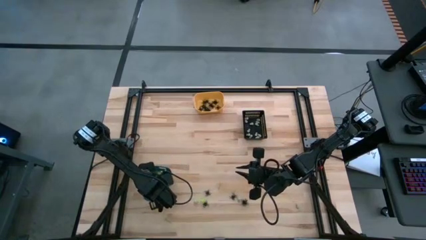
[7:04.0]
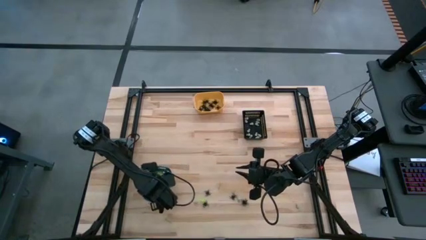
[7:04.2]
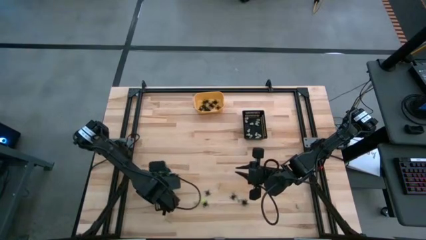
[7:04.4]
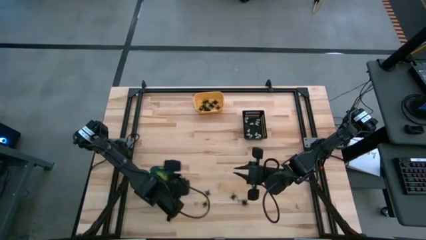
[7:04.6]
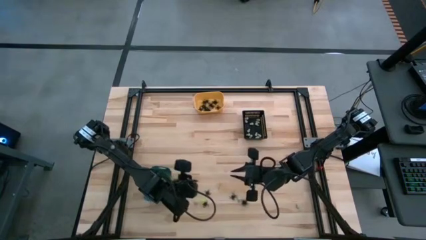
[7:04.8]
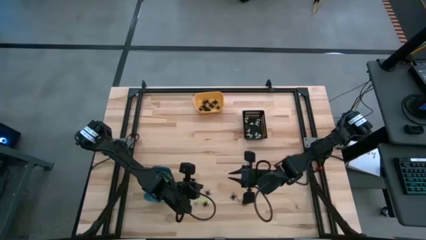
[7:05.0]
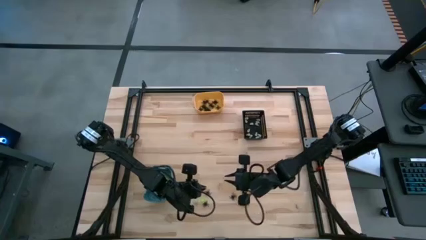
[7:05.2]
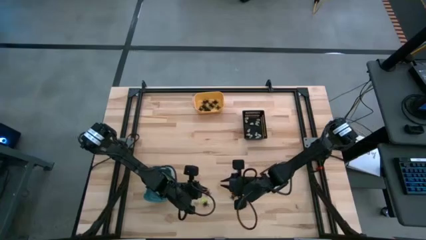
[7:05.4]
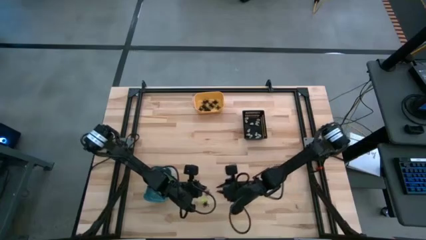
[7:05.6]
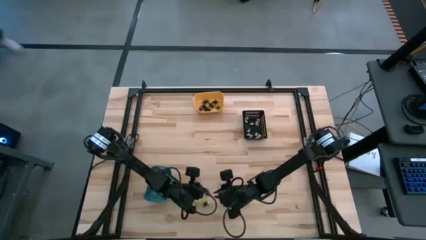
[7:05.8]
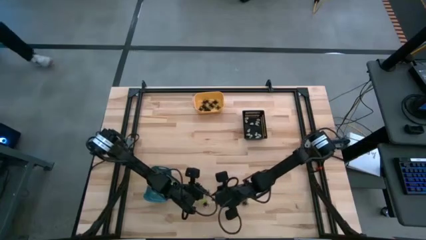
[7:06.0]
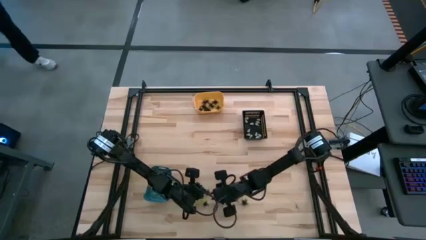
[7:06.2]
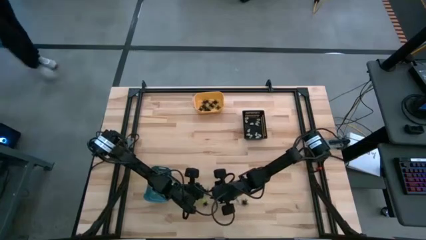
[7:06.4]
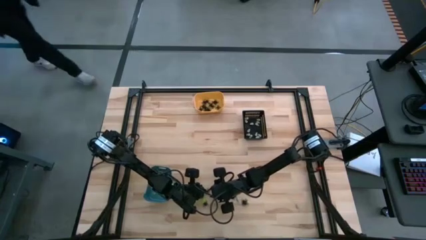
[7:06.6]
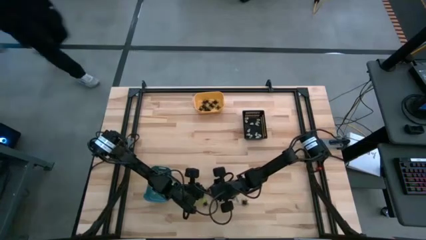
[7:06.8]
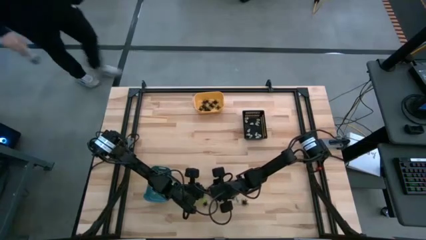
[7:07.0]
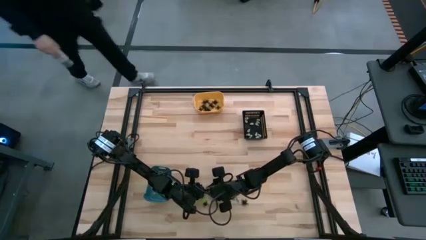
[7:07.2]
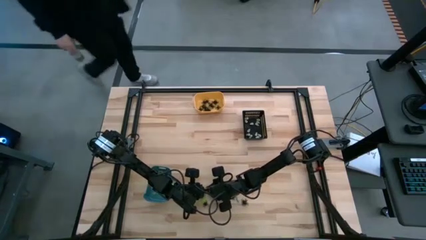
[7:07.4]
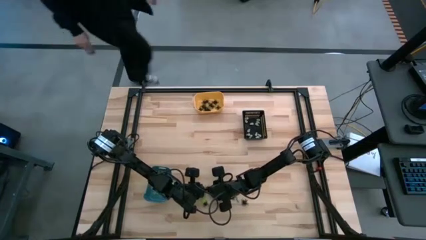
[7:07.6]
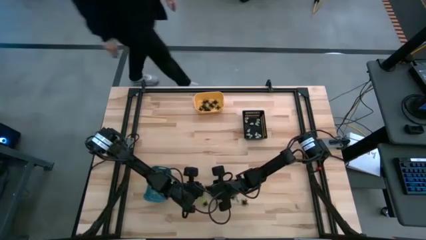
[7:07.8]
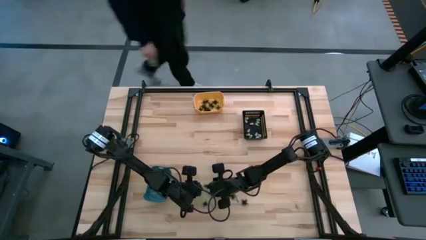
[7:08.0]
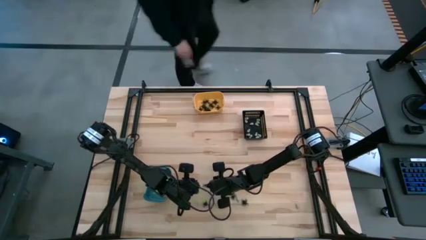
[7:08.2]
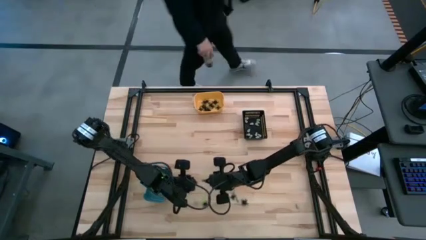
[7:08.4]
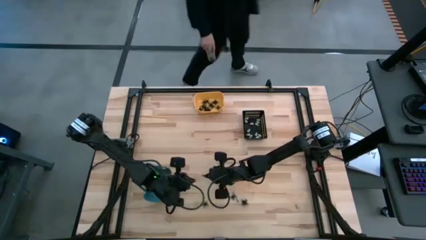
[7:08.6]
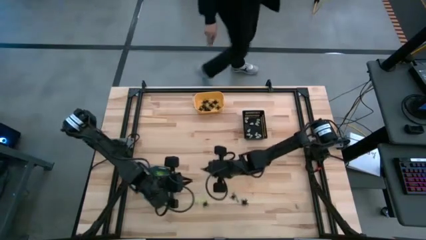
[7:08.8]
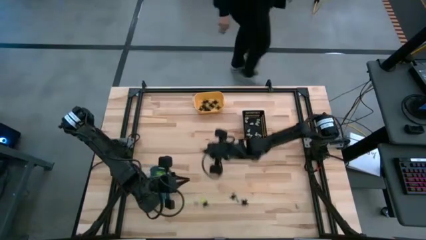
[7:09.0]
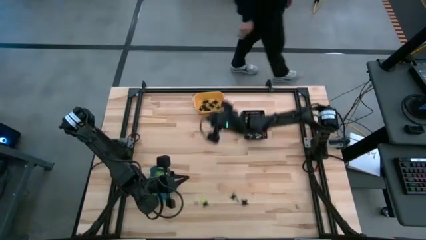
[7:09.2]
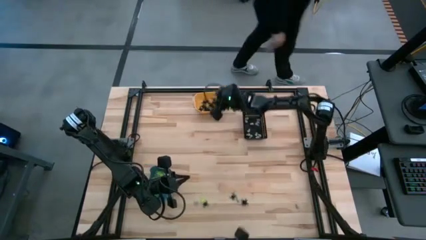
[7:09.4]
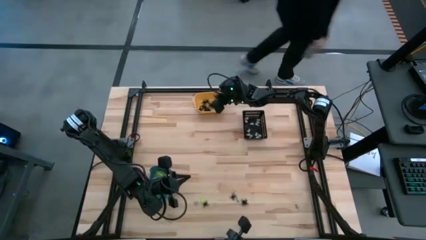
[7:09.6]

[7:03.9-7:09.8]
Task: Sort Halloween decoration
Put the black spider toy into the yellow bin

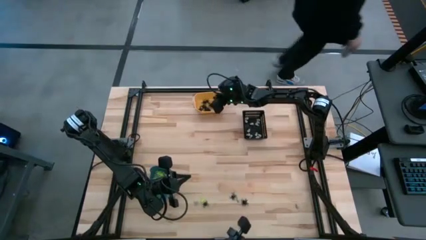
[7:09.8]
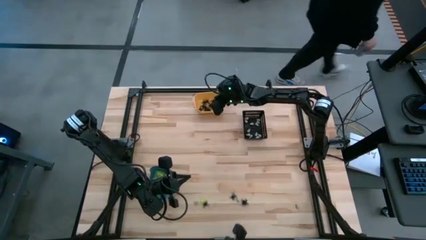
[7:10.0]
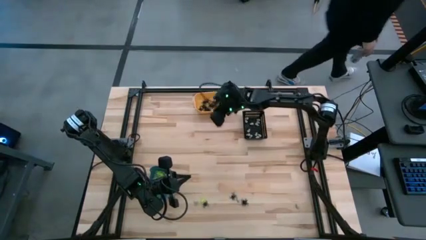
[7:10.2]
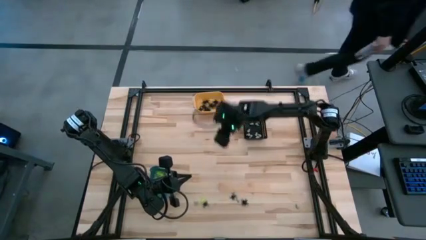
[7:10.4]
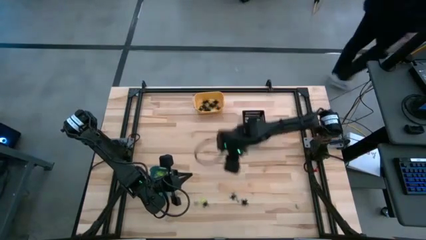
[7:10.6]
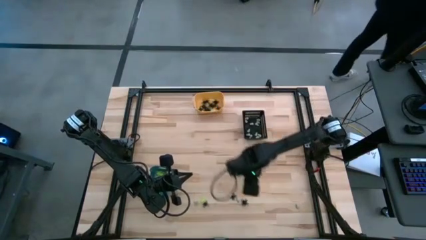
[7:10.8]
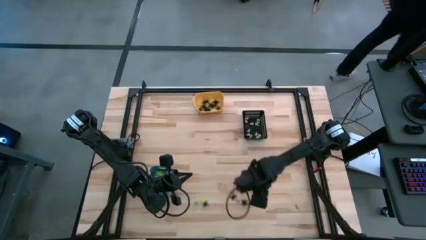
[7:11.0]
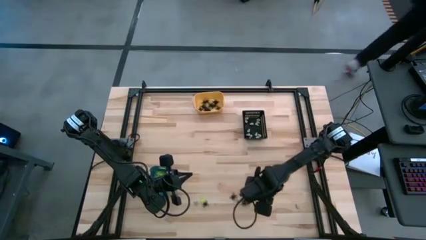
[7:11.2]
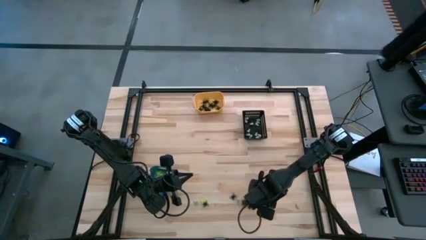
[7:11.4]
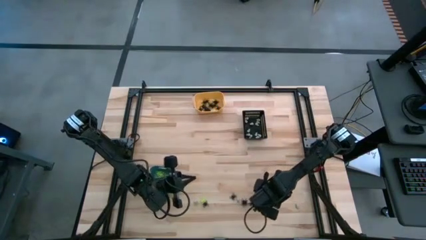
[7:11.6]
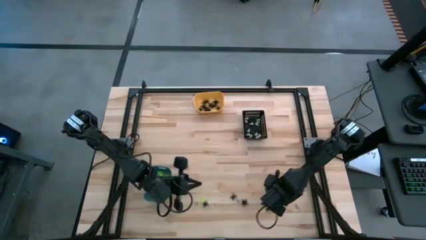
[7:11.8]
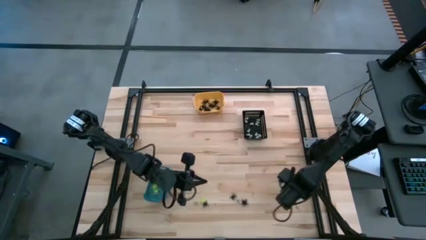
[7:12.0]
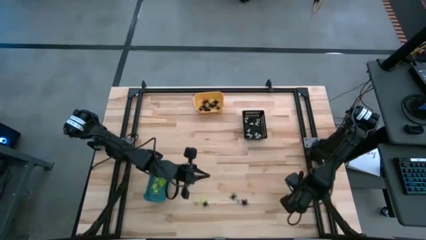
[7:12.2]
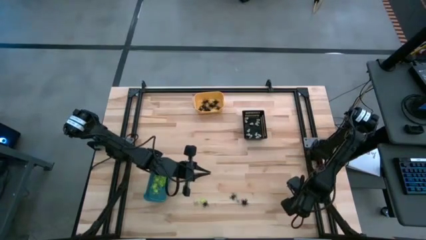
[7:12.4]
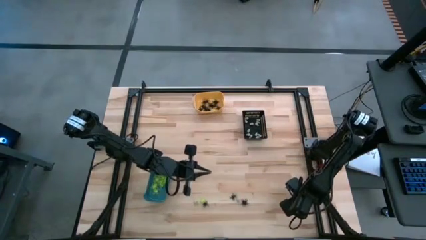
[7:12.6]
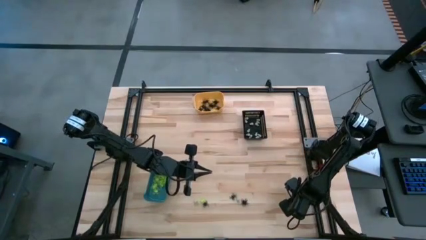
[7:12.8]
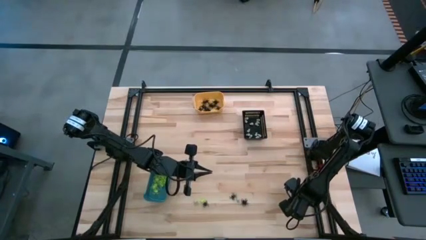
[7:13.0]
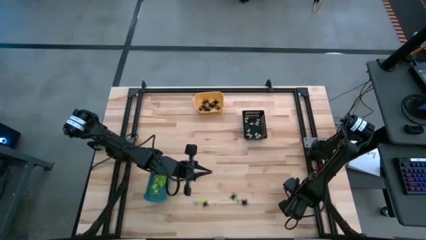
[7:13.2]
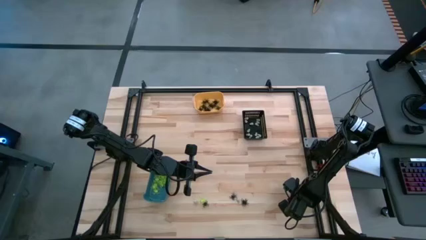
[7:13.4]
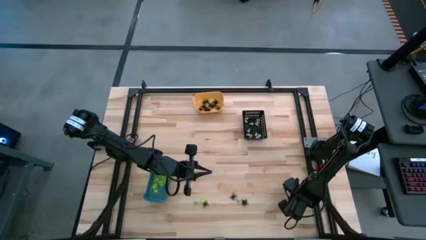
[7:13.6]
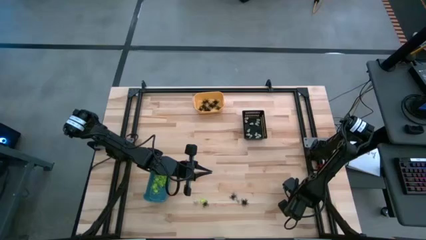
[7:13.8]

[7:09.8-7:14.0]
Put the white skull toy into the black bin

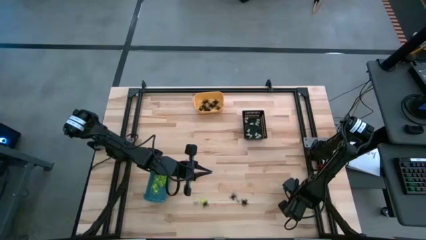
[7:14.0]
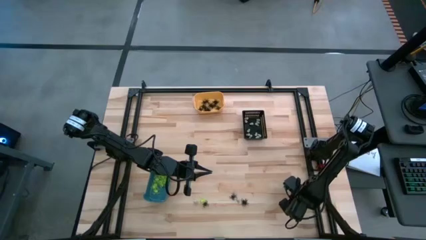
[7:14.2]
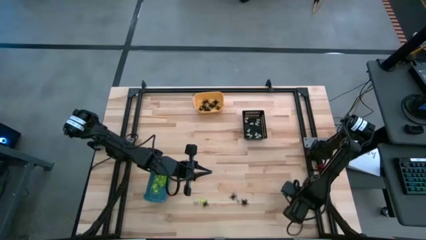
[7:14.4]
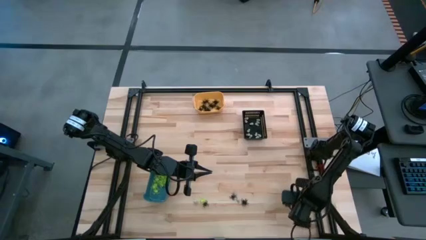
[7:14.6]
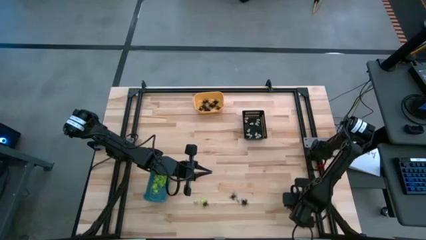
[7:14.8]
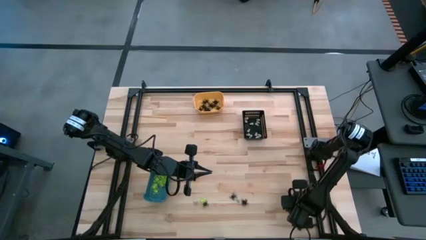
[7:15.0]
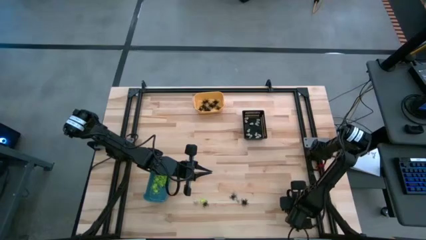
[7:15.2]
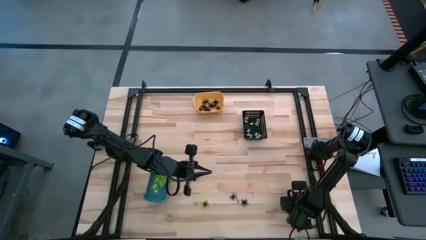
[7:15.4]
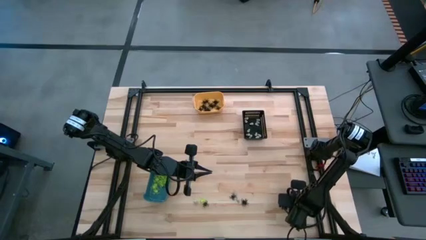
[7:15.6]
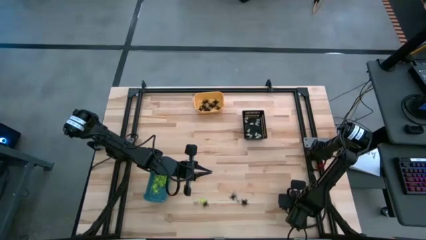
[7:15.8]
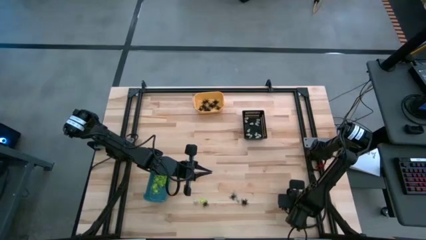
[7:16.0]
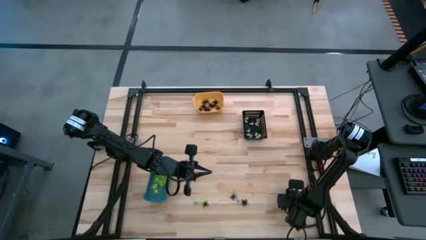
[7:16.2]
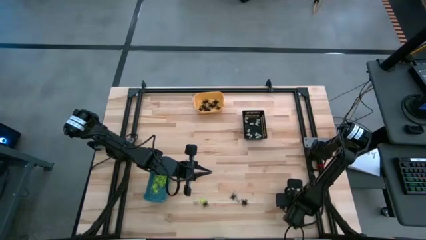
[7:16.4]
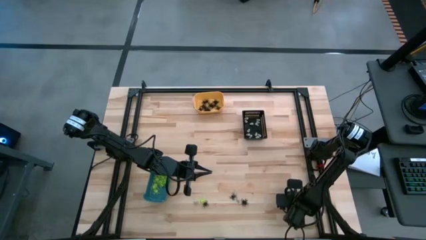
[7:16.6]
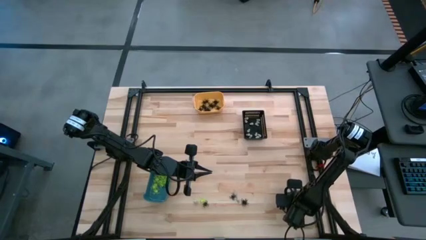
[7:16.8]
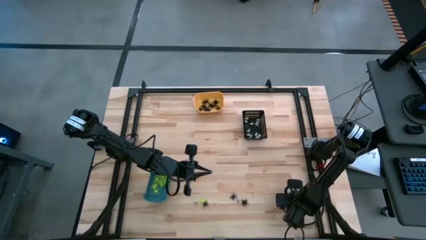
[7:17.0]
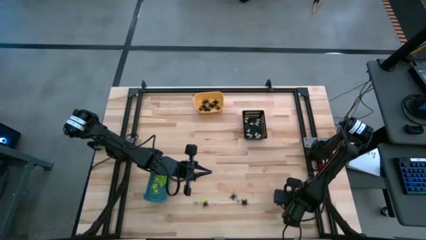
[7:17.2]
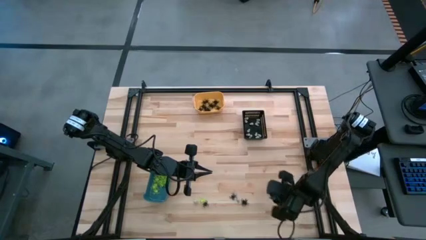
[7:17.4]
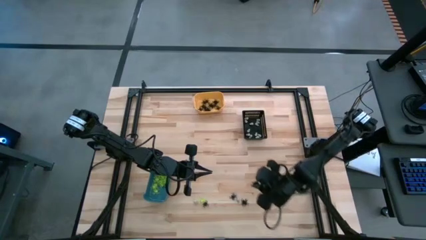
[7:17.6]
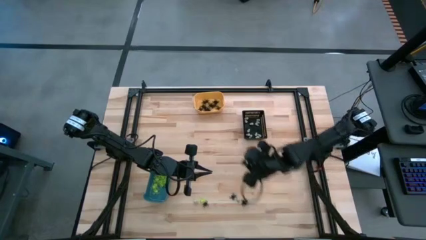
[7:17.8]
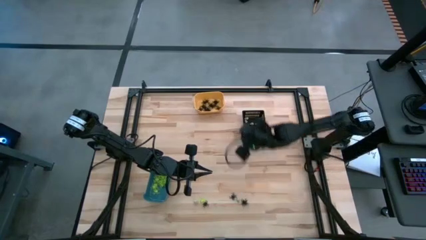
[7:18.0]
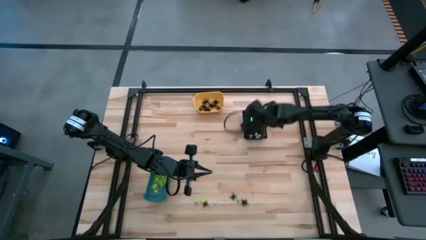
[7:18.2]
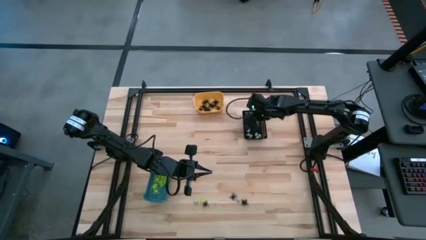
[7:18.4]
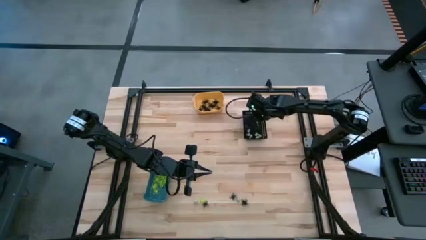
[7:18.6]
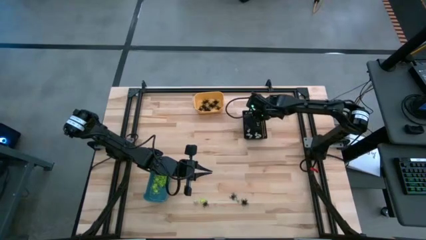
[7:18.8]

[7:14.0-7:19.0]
Put the white skull toy into the black bin
